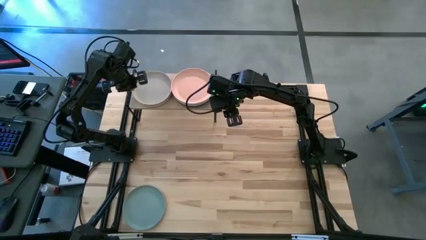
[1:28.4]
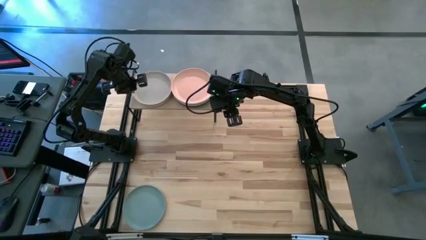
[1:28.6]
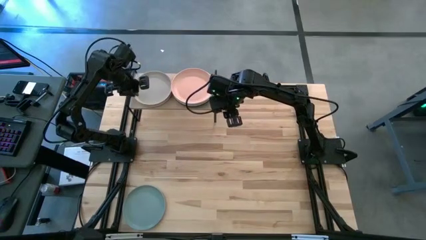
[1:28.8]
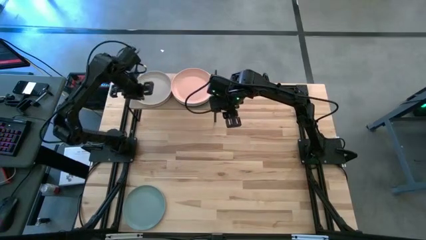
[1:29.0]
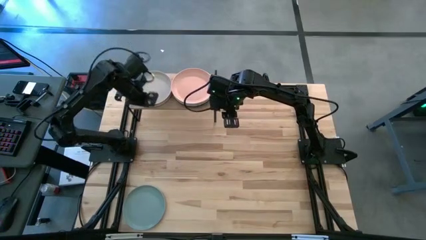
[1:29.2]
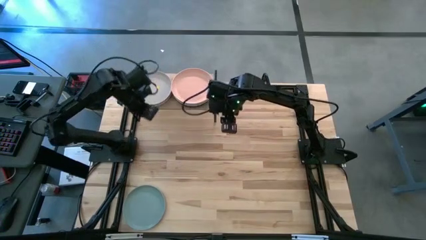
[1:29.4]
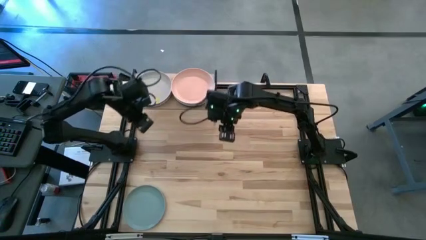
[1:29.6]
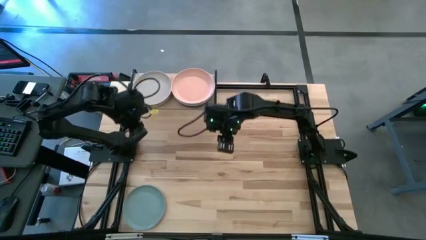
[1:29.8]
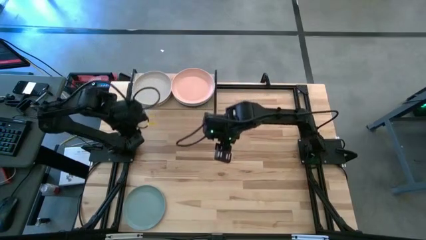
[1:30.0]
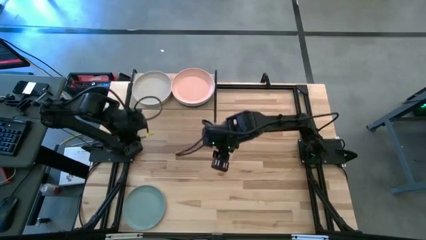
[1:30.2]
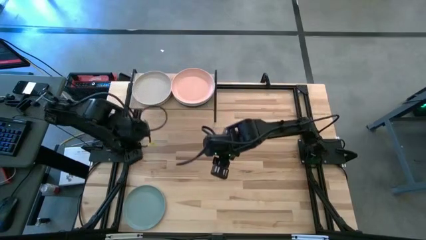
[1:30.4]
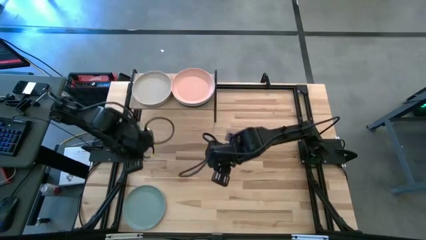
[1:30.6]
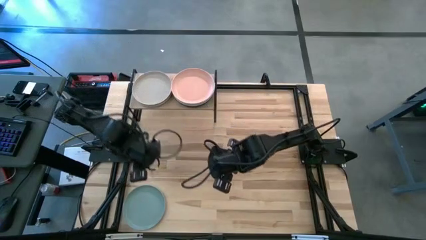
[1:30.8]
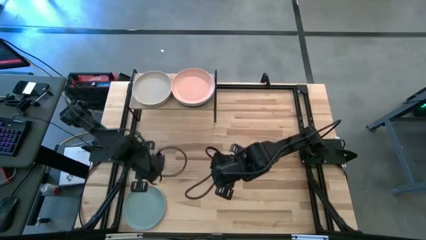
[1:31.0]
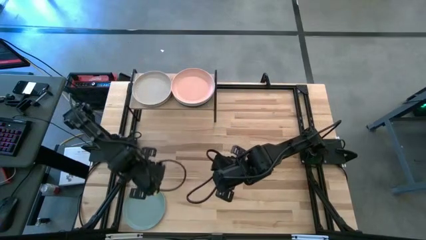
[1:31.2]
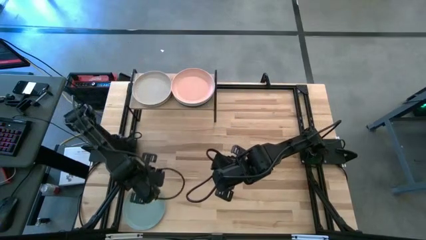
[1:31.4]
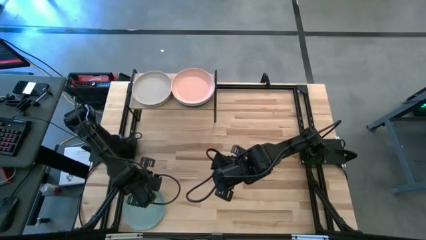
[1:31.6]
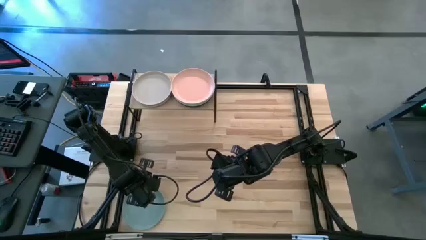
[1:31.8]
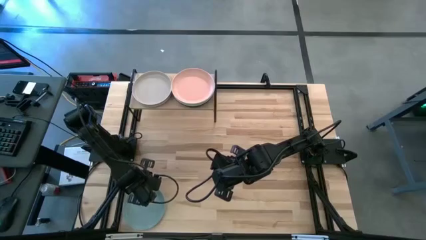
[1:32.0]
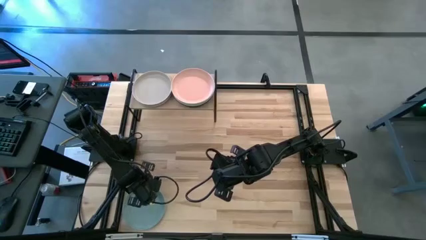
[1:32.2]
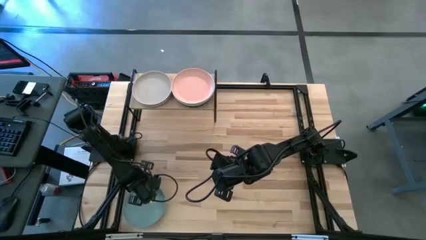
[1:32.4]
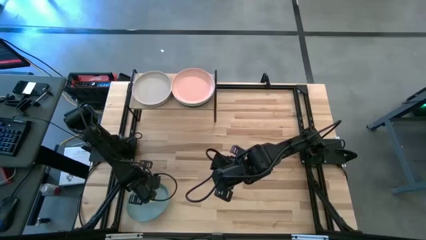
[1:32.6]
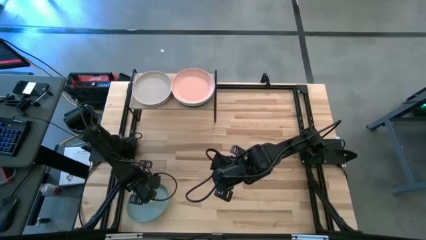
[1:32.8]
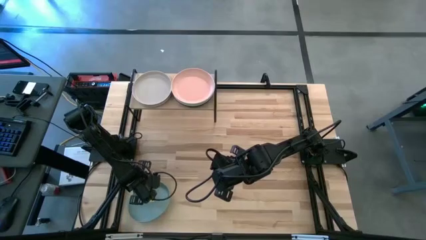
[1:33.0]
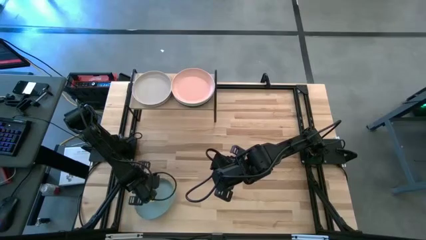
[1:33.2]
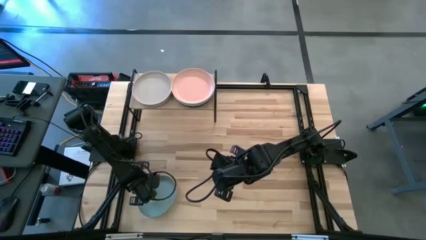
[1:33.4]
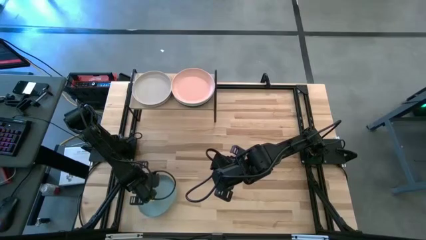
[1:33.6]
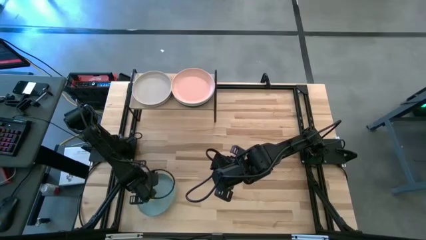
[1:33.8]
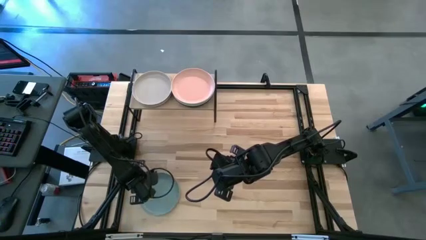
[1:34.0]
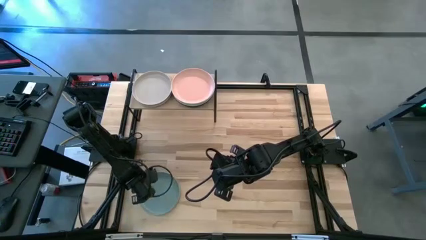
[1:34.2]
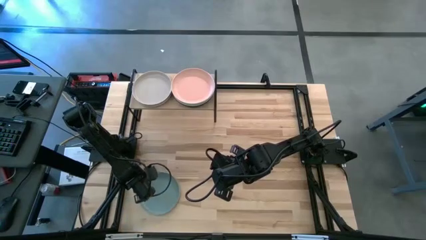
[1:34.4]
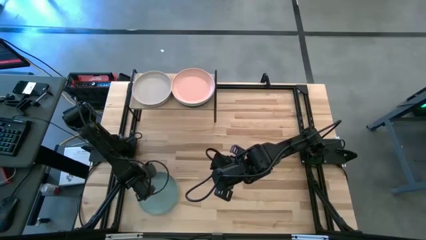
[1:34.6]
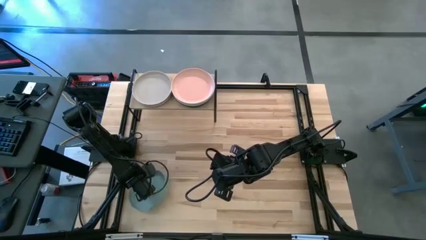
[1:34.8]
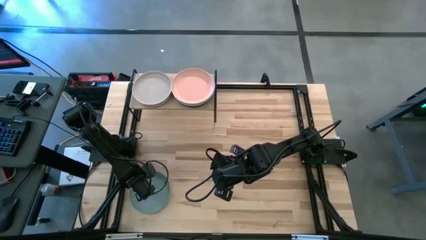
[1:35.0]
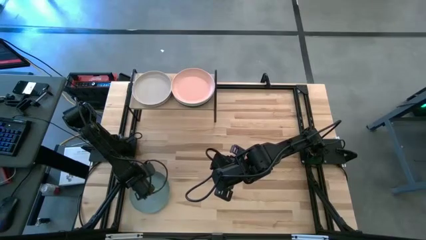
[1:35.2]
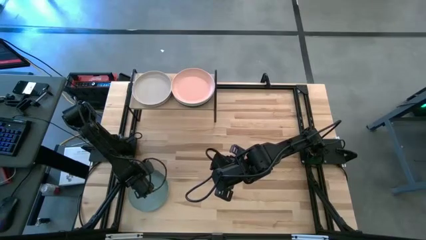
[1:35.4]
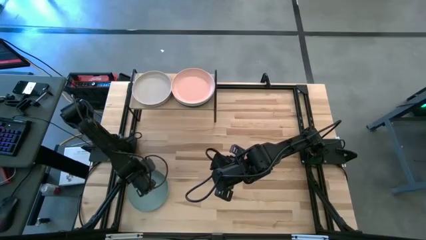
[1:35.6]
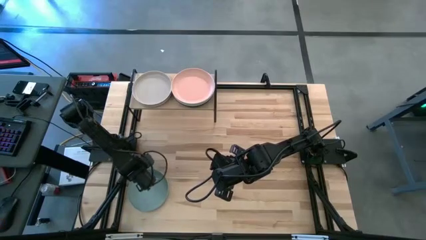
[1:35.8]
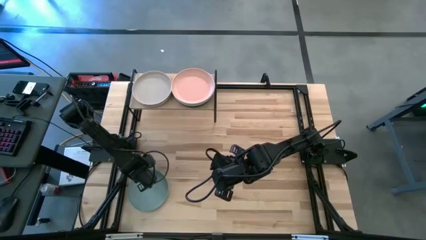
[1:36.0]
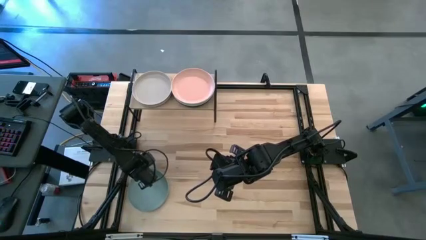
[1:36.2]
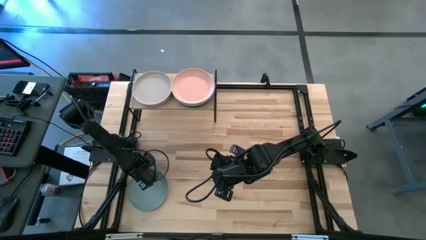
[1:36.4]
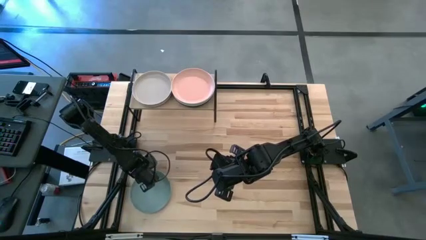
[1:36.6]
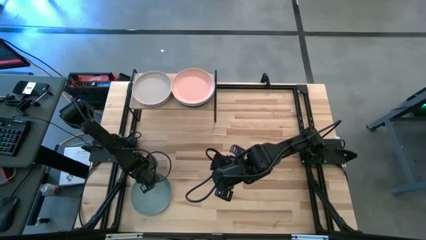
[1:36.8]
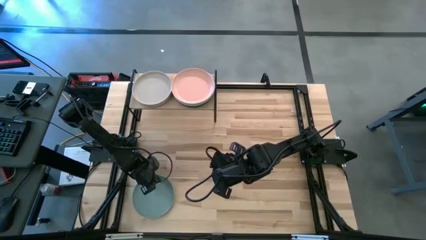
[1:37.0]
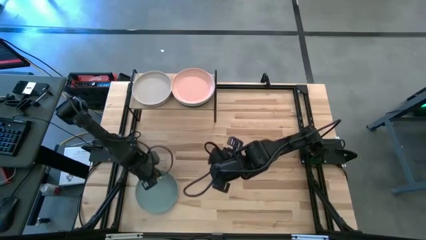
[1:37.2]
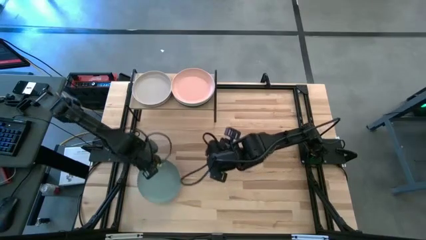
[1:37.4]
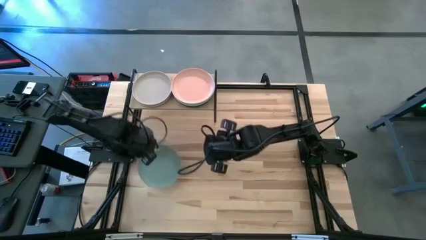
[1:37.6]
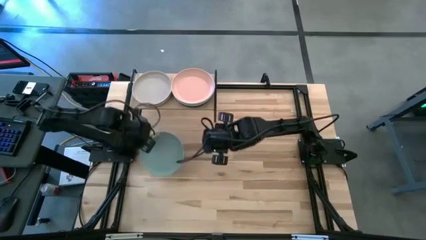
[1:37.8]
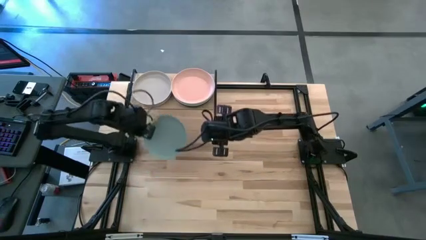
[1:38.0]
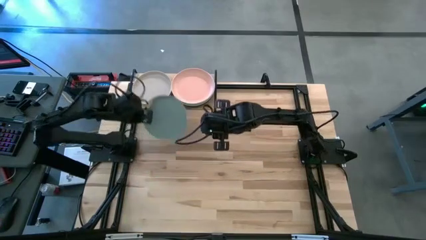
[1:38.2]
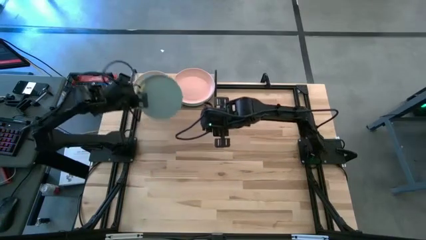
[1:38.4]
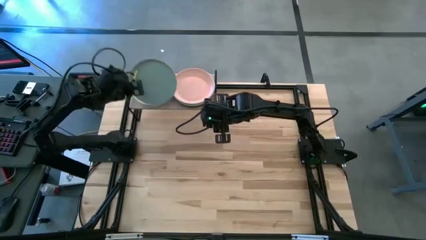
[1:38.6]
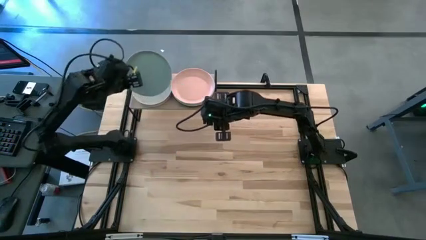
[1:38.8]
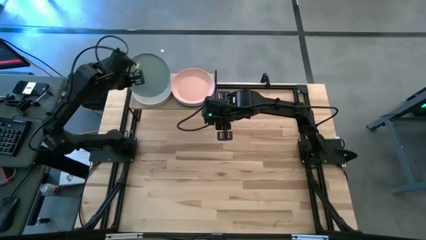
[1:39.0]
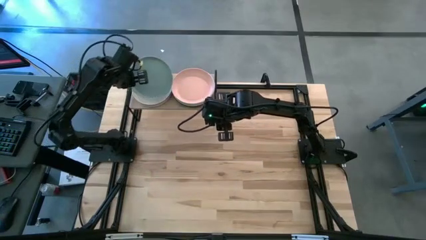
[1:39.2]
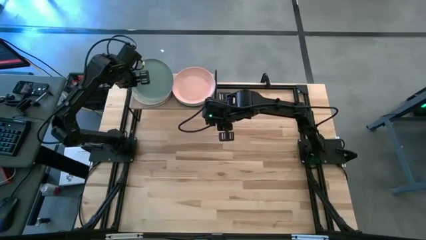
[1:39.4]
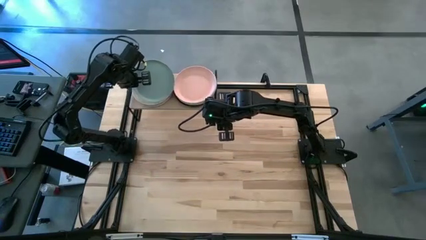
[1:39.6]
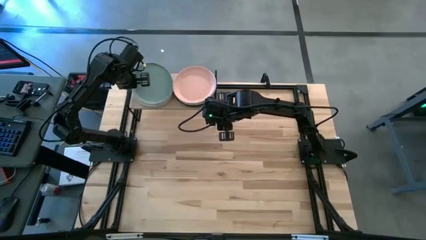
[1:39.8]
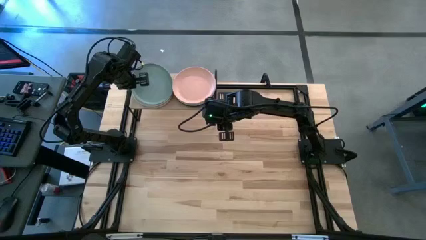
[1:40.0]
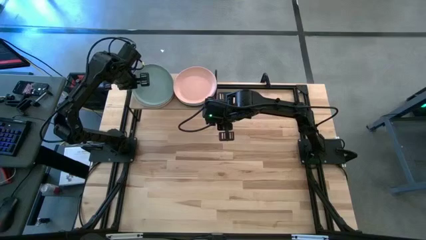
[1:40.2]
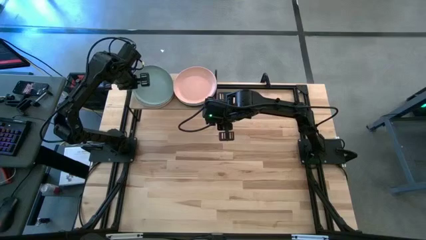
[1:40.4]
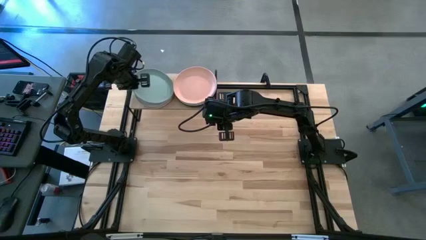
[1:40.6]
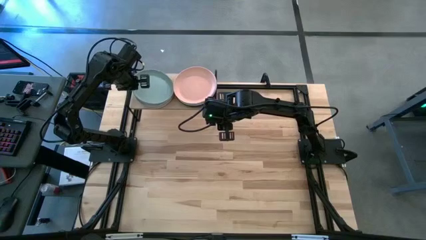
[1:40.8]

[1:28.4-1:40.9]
Task: Place and stack plates onto a shelf
Stack the light blue plate on top of the white plate on the shelf

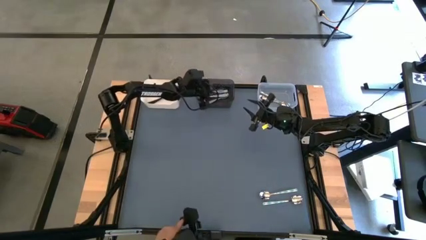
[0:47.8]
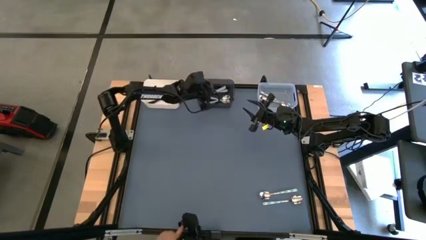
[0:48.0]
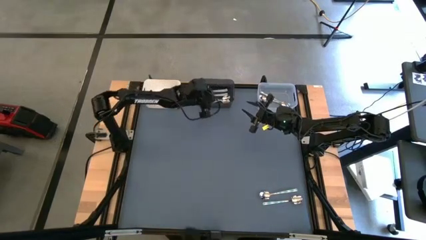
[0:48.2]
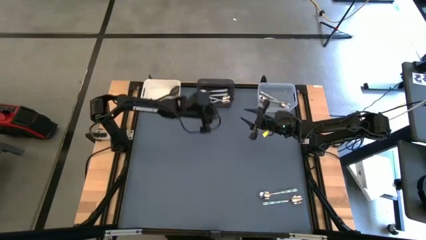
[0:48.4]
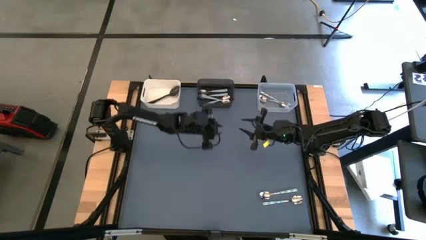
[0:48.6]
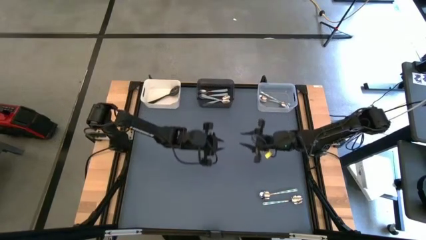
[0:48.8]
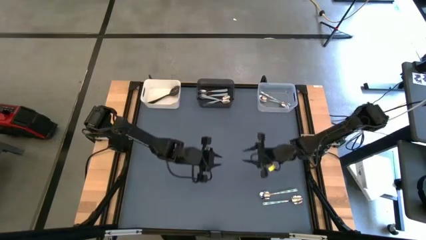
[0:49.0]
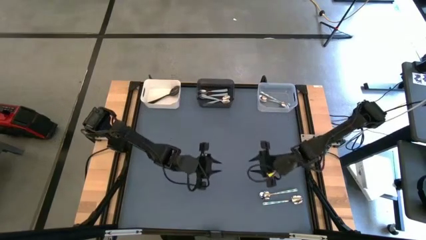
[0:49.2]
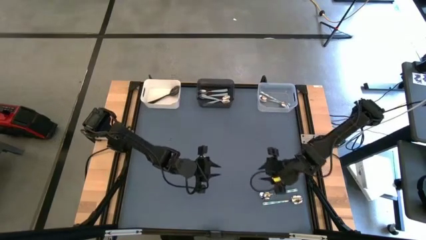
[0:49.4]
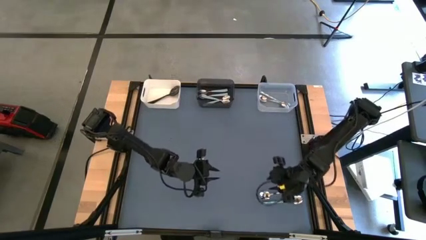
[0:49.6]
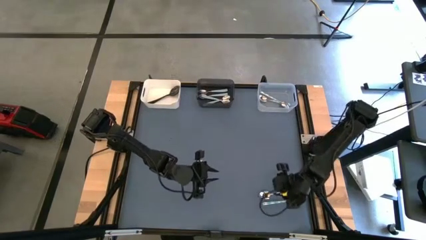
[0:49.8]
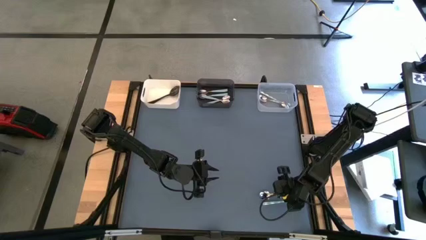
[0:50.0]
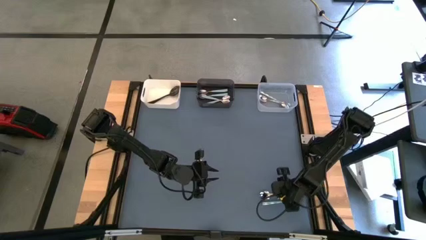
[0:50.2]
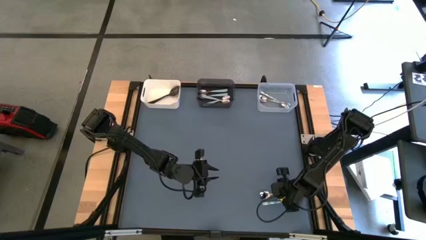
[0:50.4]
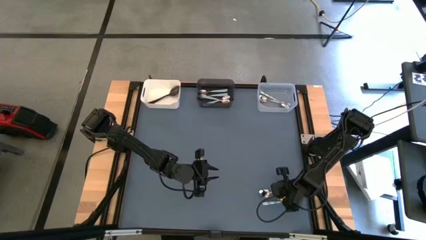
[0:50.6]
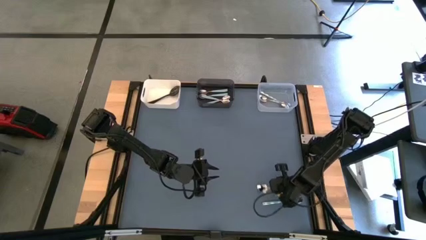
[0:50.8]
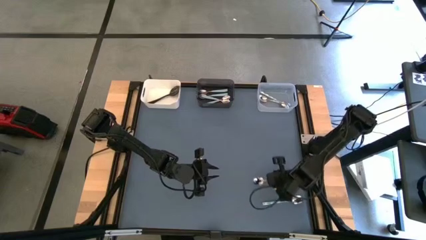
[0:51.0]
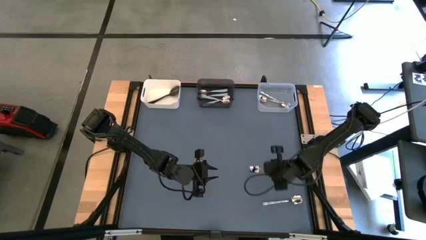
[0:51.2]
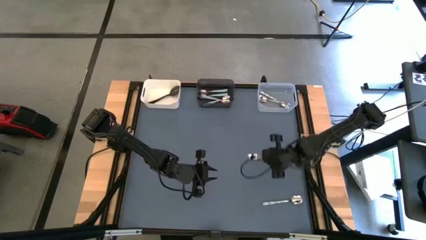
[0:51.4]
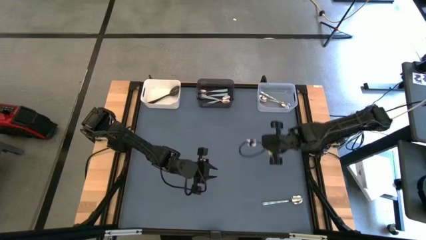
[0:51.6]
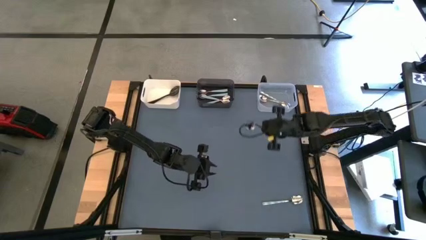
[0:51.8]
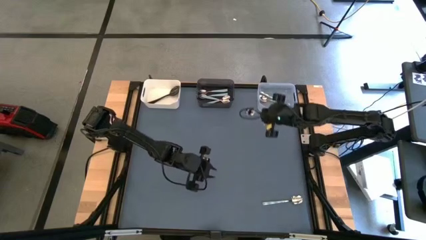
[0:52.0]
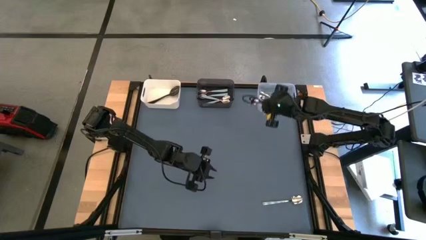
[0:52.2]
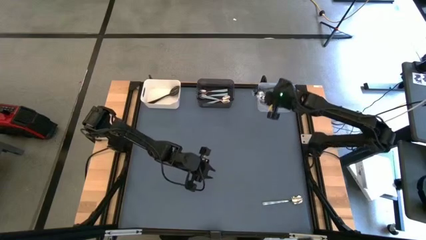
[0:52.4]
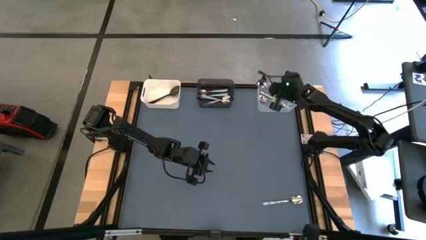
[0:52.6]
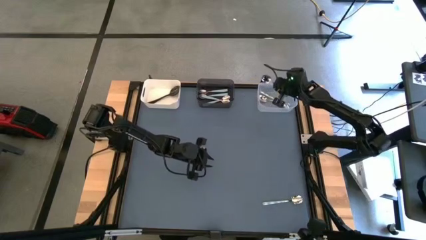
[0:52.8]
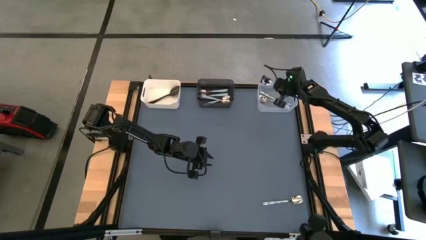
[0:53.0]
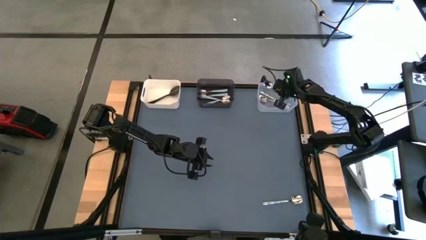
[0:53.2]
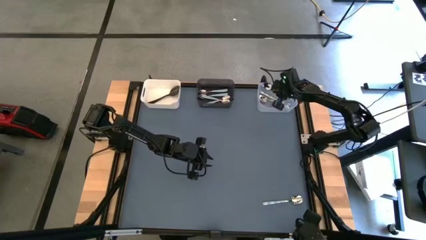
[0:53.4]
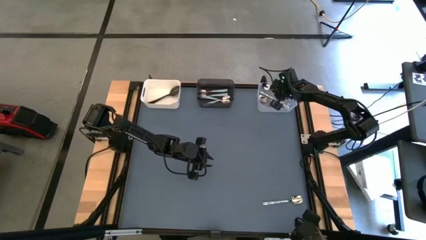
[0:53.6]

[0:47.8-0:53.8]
Task: Sort silverware by color (type)
Put the top white and blue patterned spoon into the transparent bin
